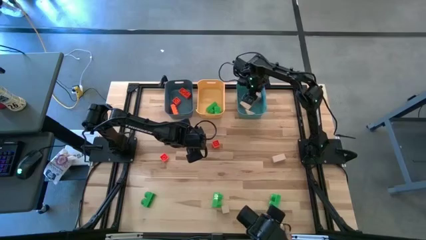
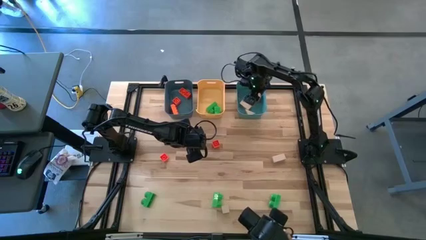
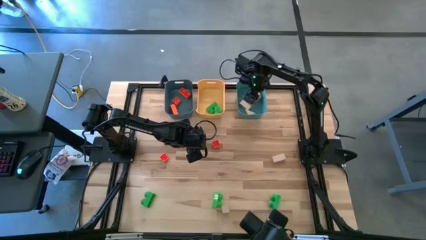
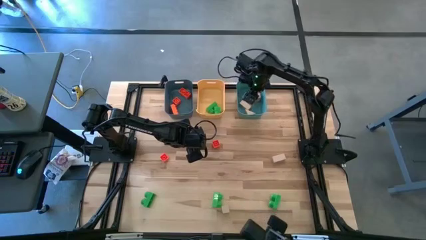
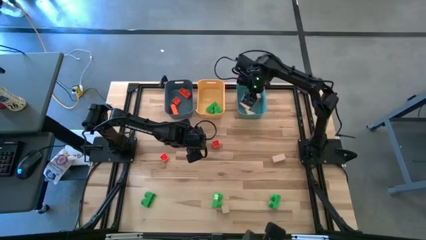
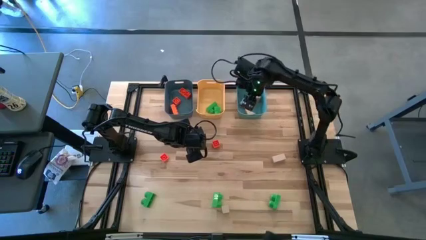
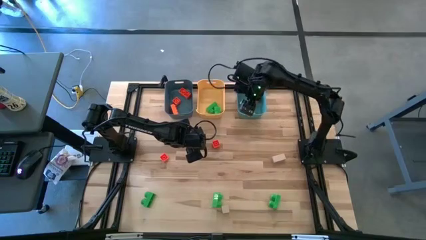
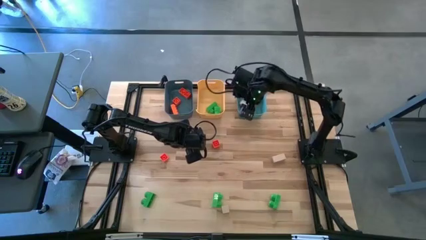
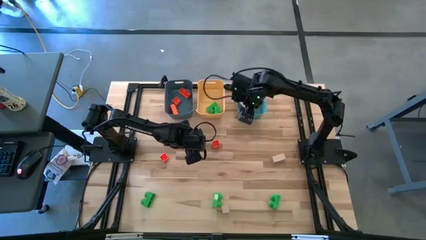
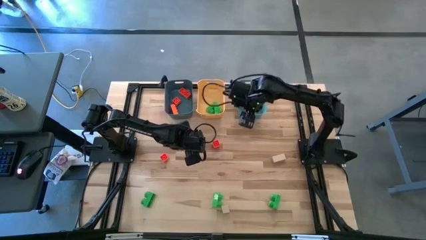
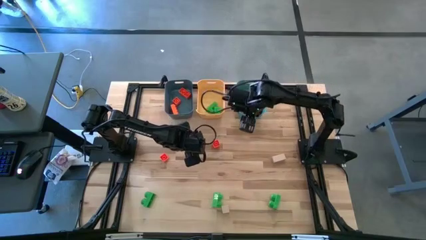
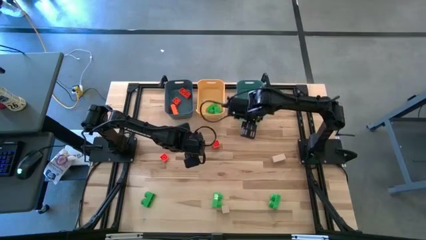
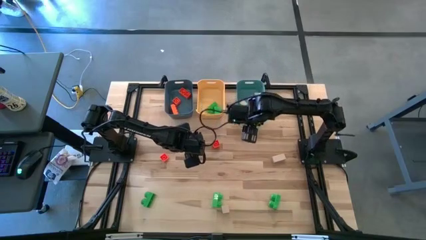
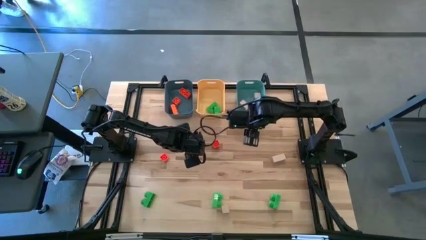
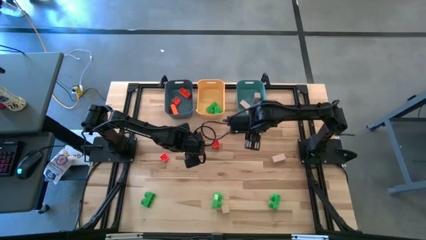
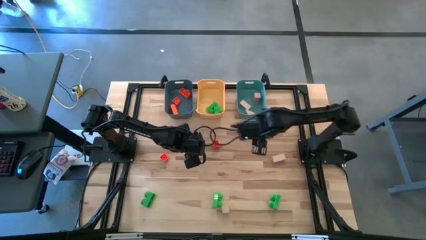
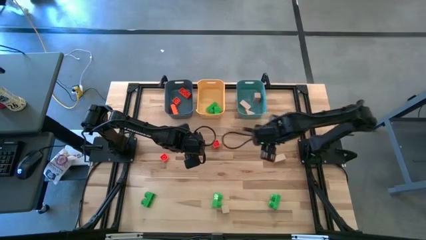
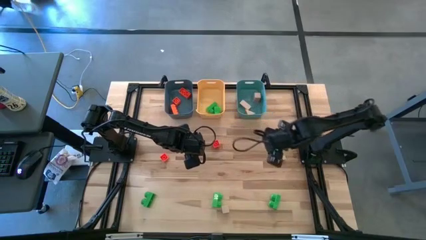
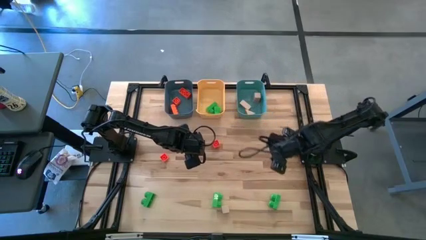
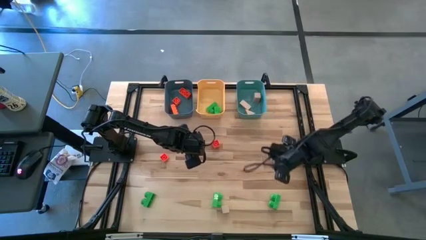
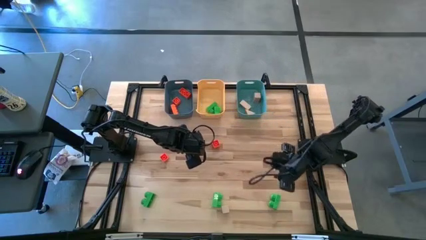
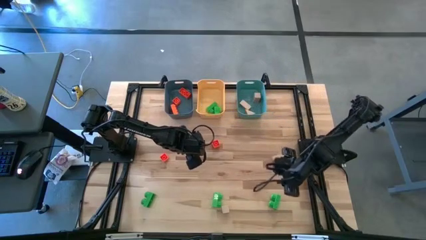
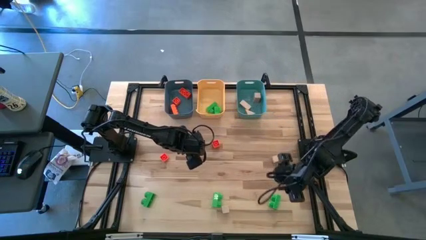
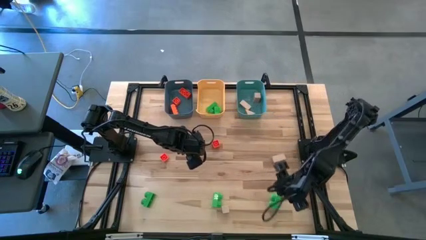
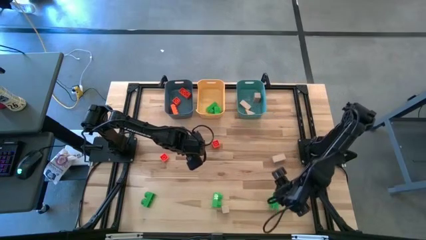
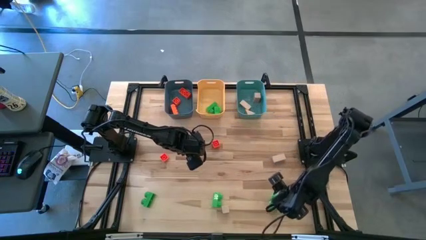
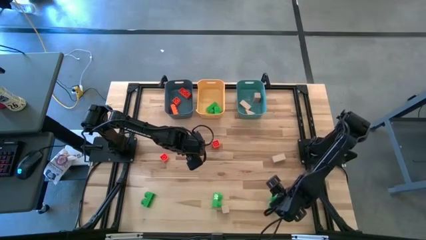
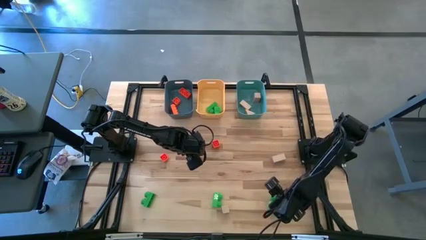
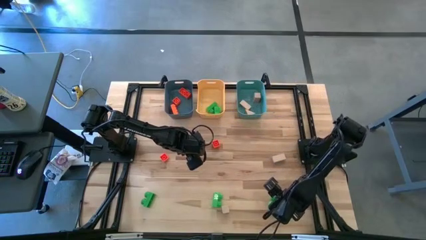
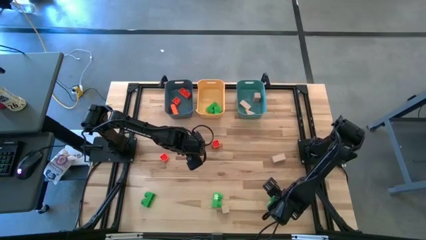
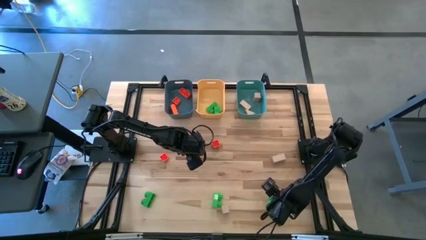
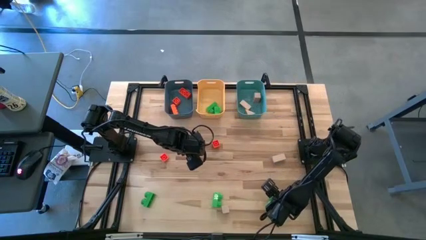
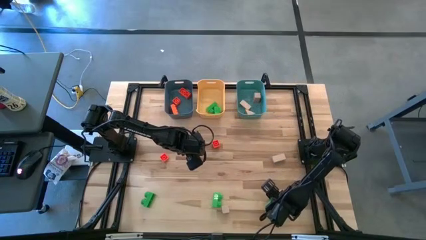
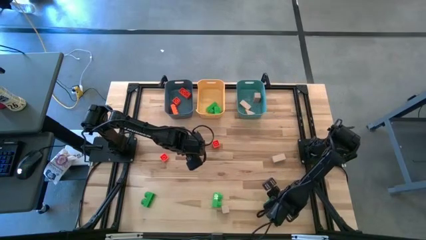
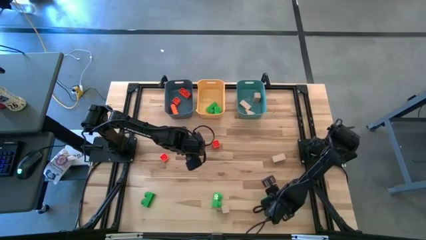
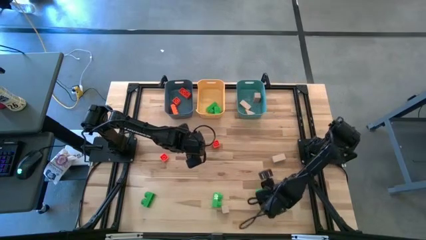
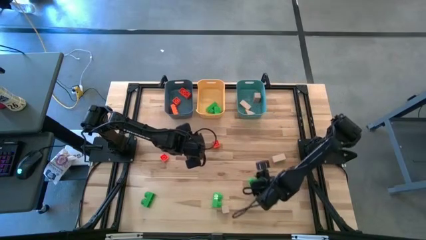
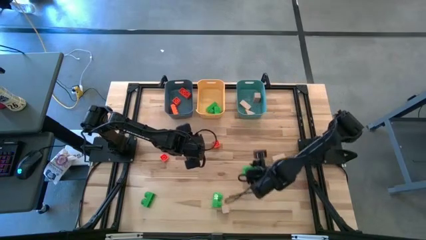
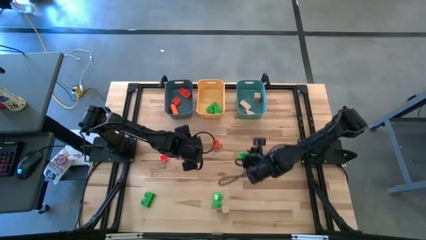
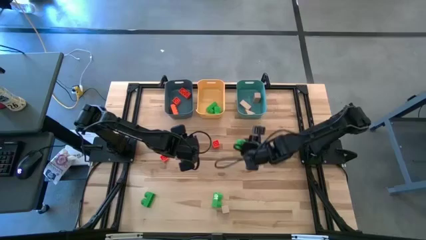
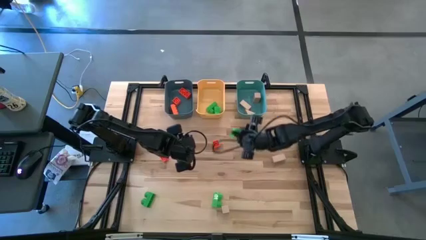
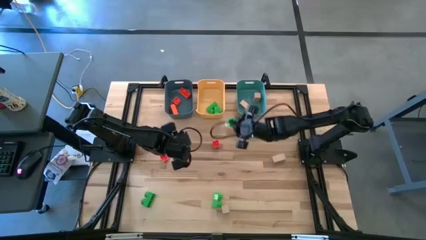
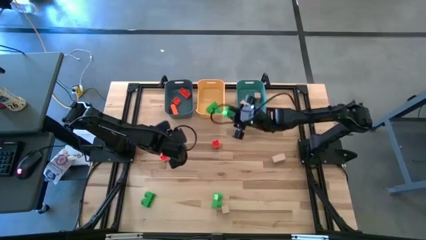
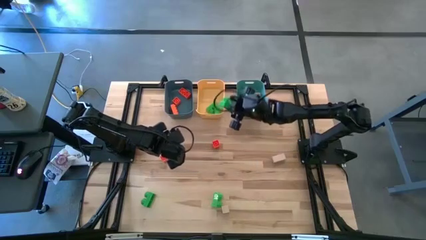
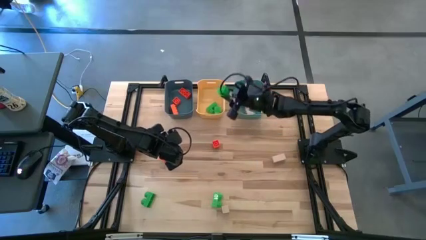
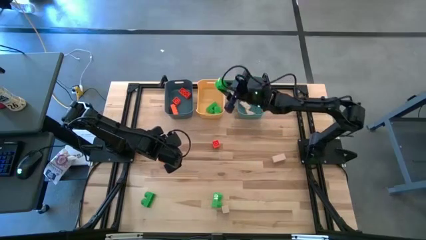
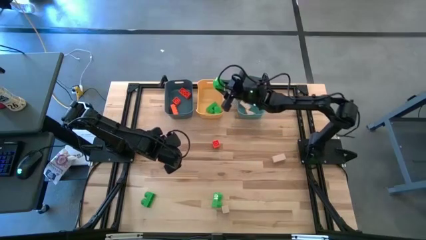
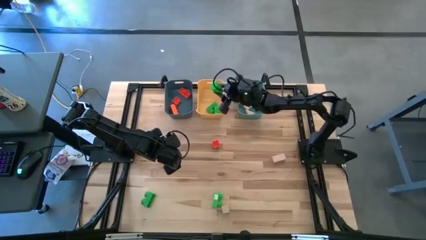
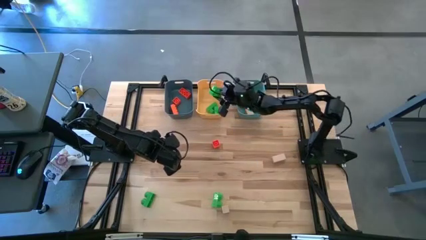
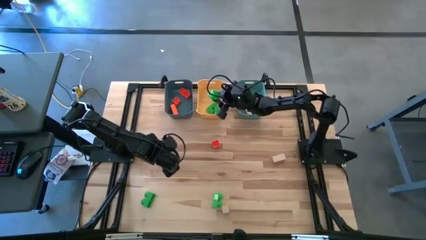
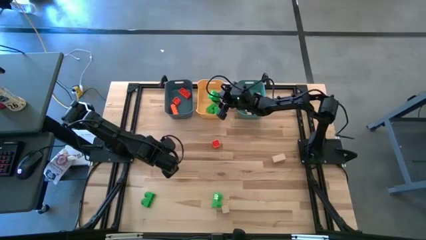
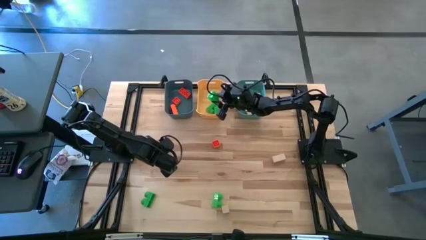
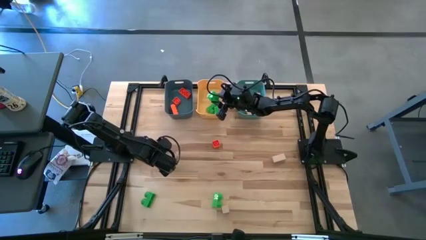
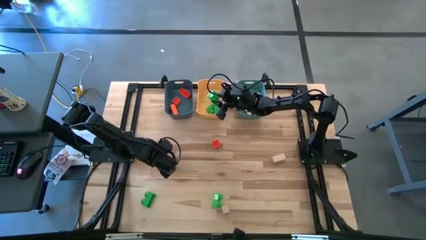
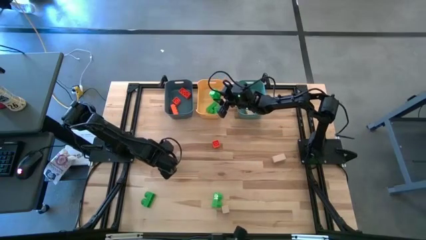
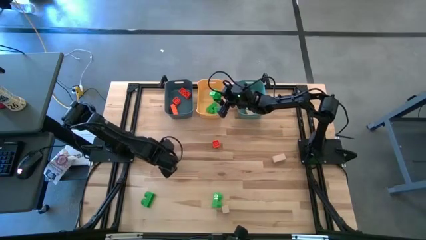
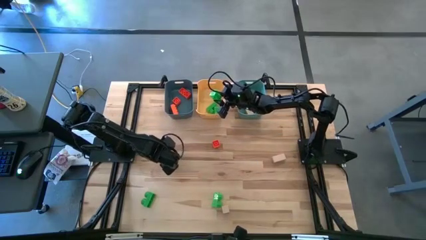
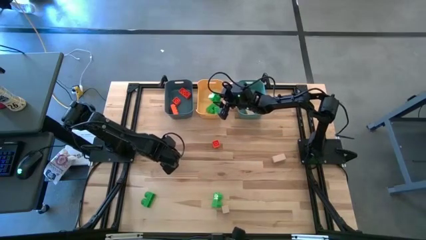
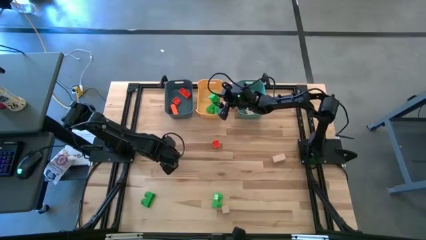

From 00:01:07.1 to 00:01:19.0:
Task: Sort & place blocks by color
Put the green game piece into the yellow bin

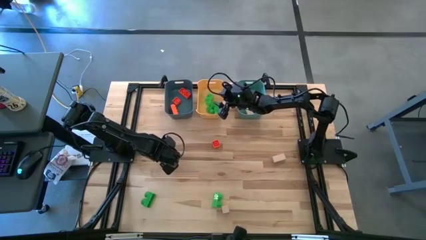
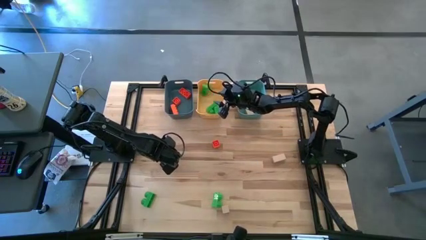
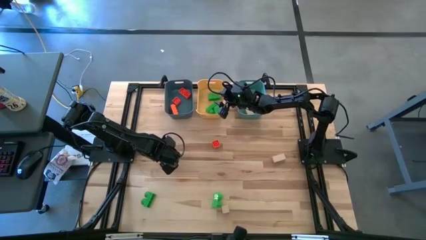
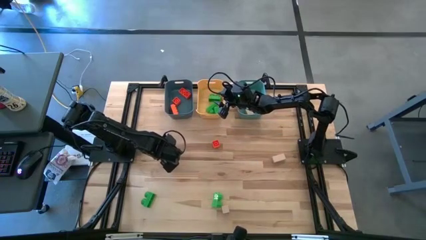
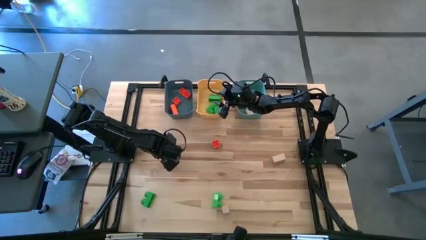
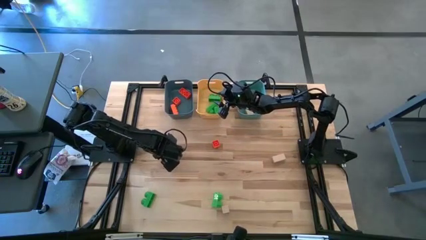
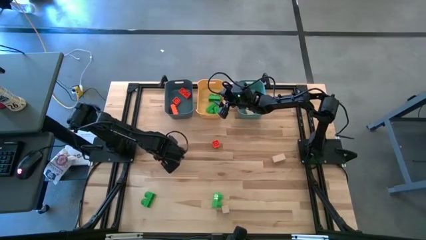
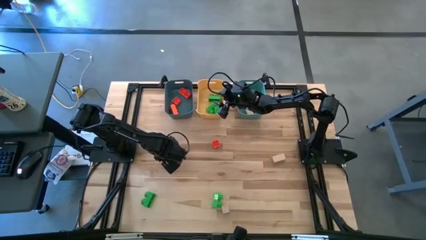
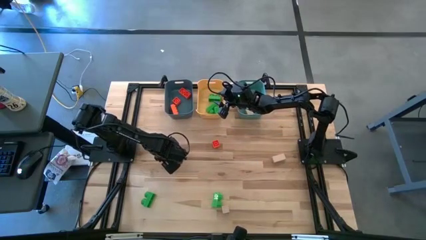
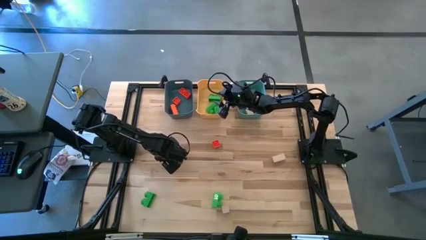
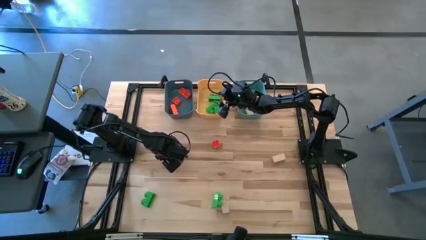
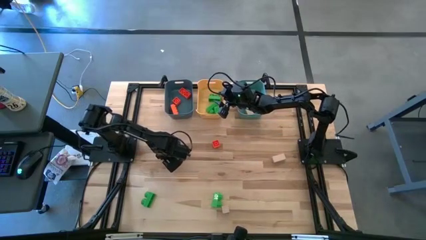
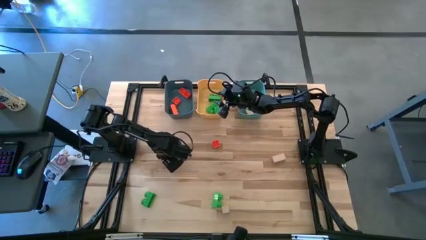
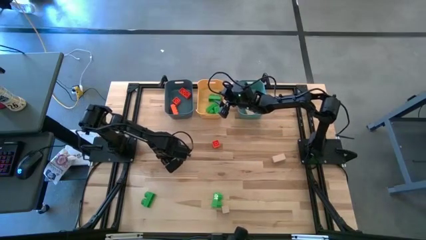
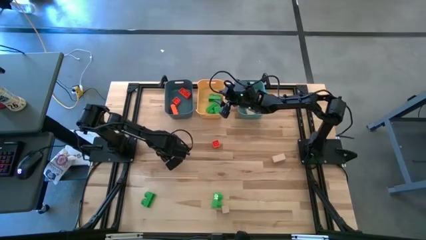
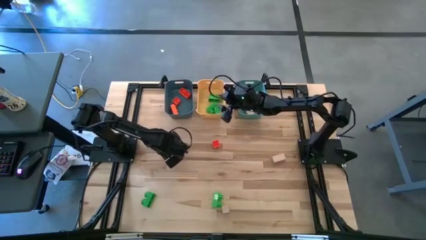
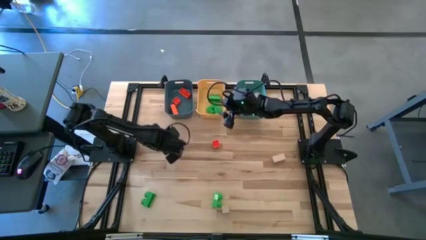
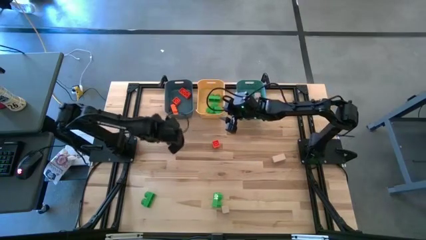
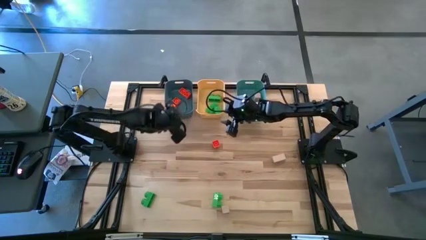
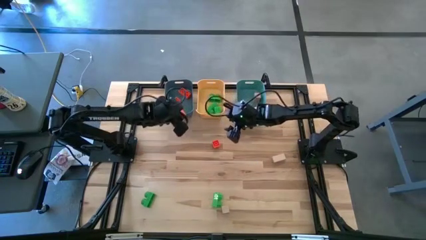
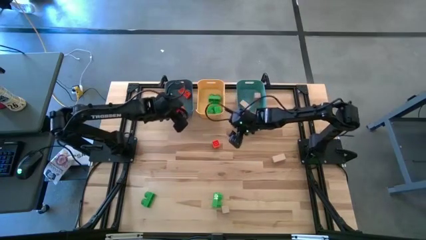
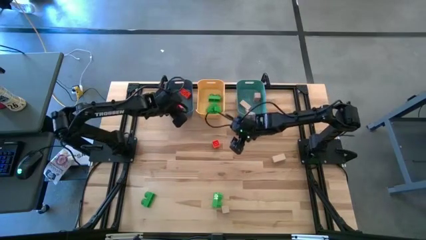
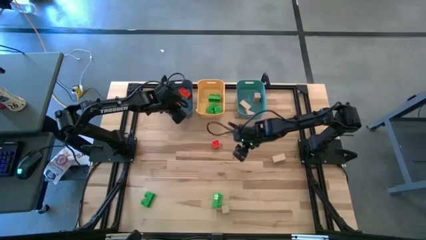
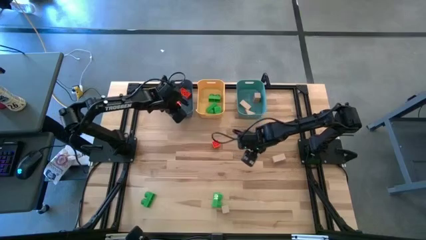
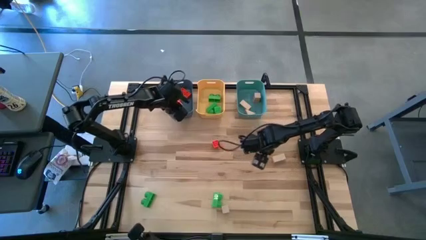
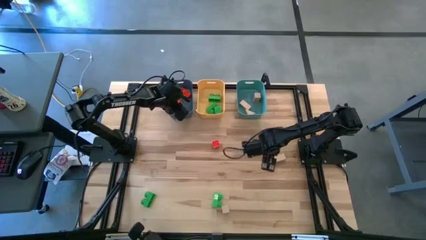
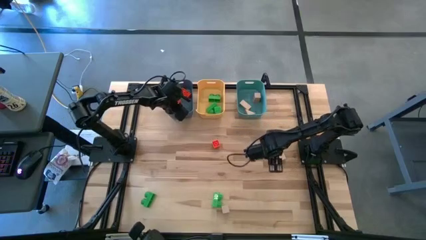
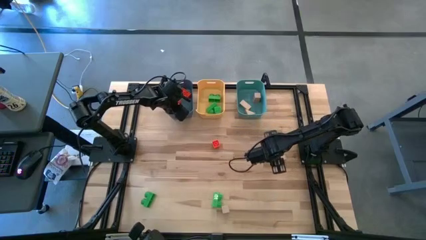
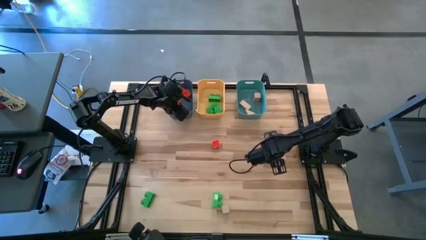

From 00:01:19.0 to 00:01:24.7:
Put the orange game piece into the blue bin
